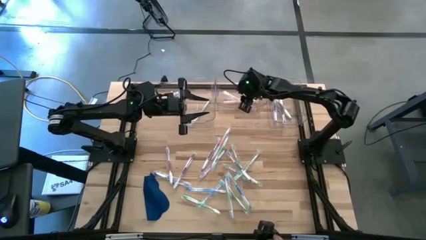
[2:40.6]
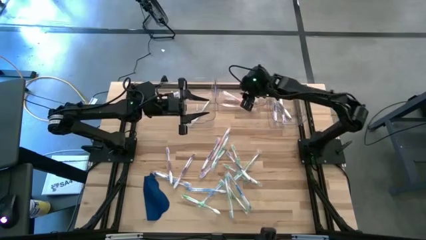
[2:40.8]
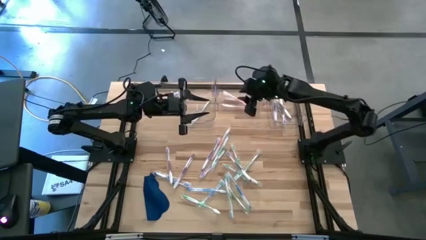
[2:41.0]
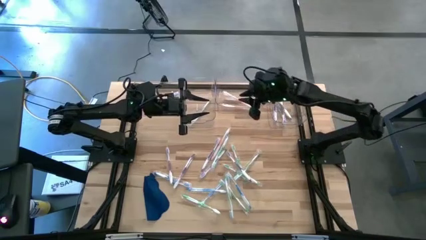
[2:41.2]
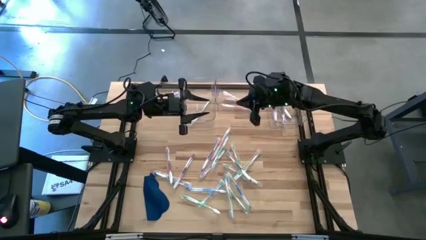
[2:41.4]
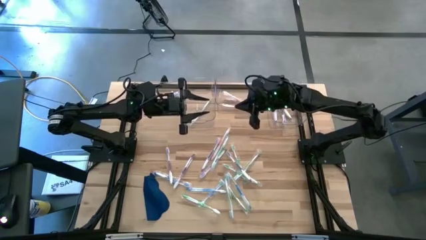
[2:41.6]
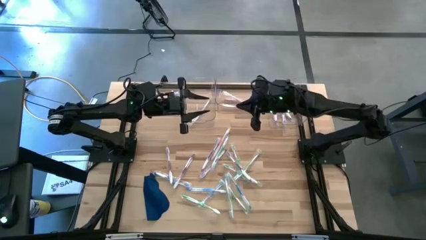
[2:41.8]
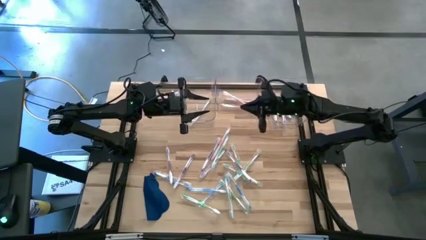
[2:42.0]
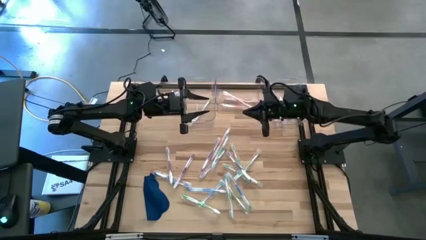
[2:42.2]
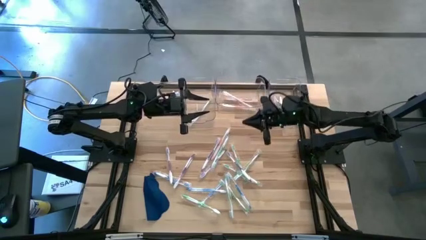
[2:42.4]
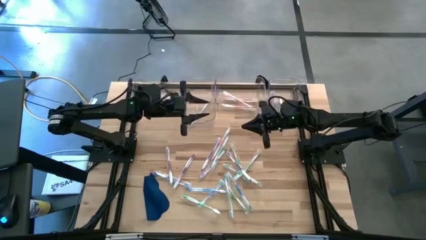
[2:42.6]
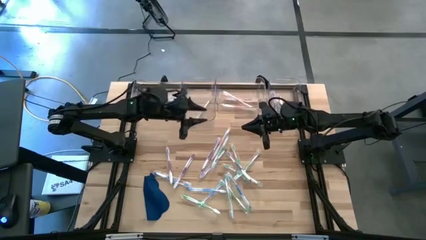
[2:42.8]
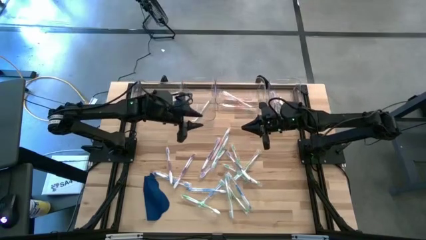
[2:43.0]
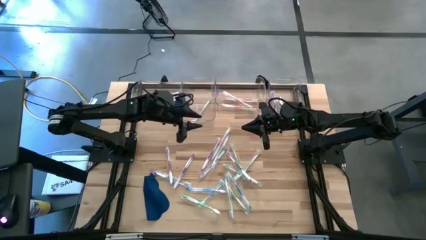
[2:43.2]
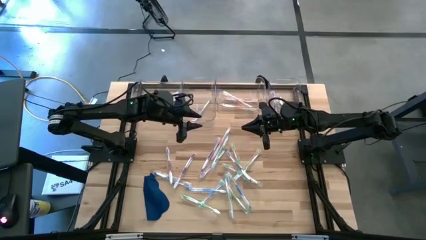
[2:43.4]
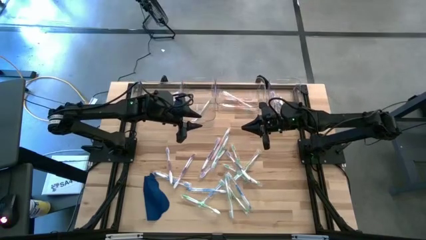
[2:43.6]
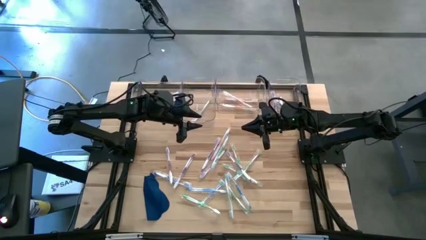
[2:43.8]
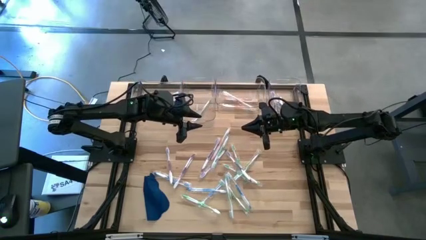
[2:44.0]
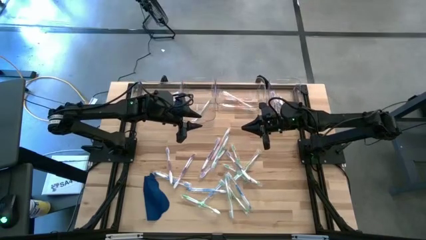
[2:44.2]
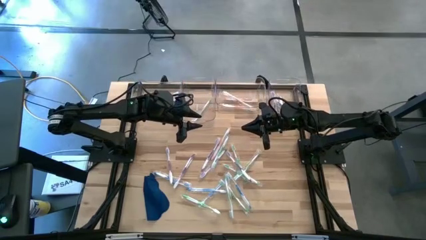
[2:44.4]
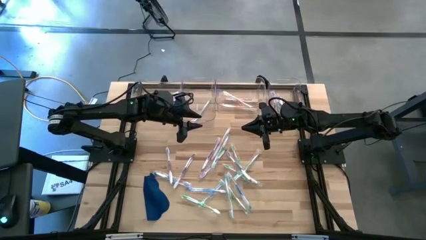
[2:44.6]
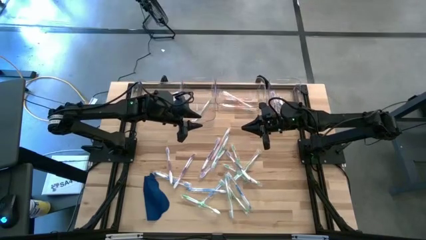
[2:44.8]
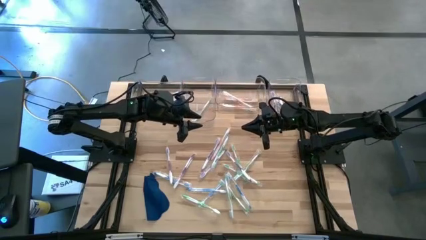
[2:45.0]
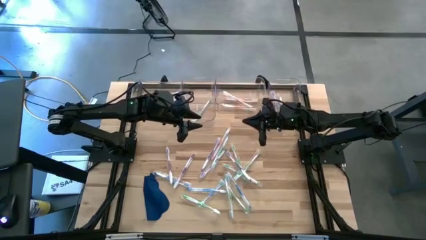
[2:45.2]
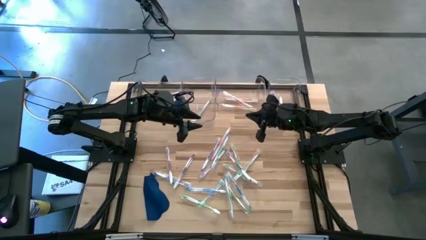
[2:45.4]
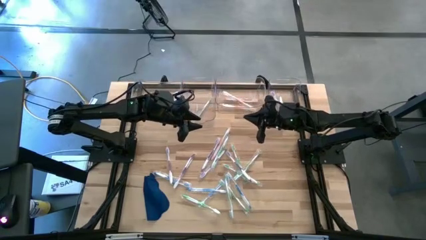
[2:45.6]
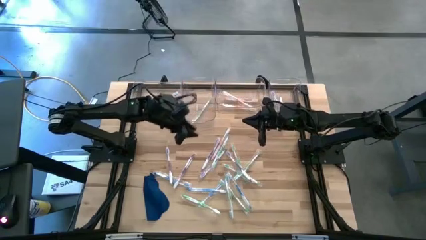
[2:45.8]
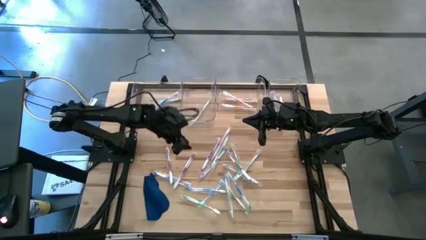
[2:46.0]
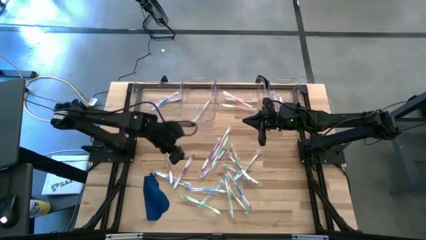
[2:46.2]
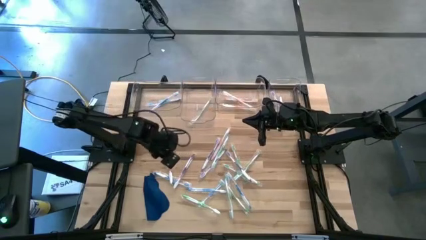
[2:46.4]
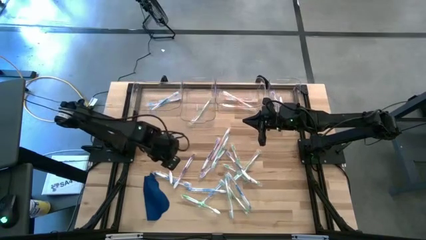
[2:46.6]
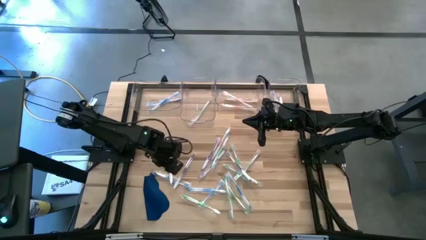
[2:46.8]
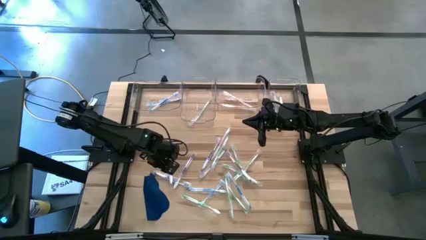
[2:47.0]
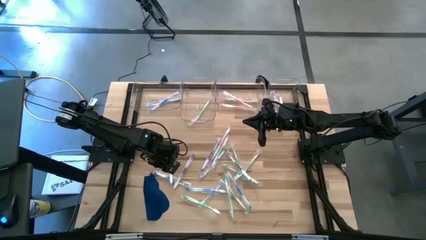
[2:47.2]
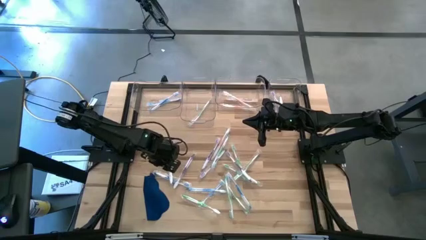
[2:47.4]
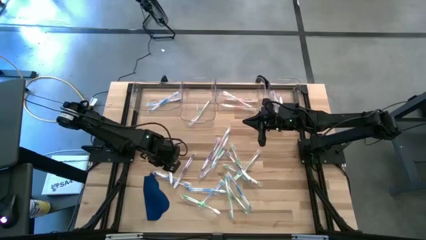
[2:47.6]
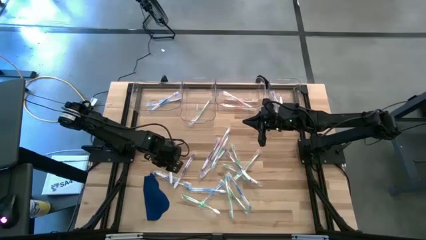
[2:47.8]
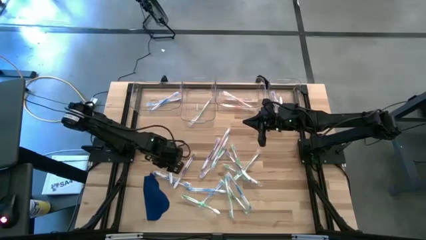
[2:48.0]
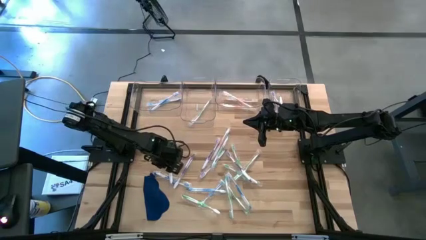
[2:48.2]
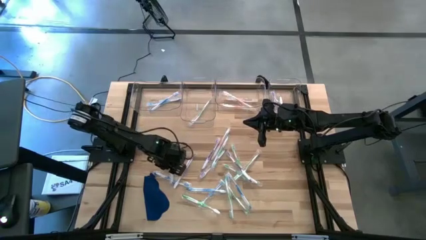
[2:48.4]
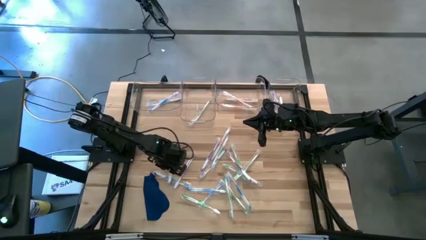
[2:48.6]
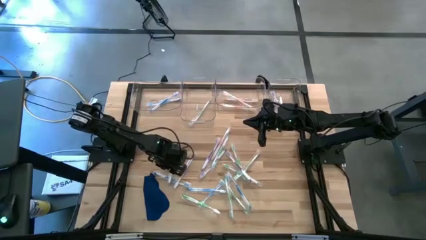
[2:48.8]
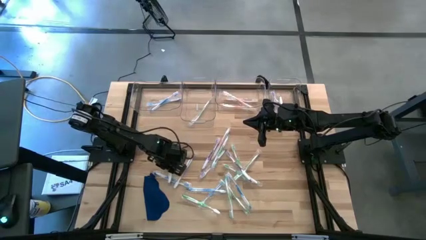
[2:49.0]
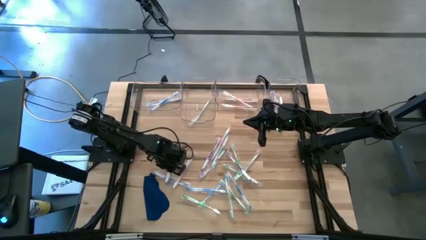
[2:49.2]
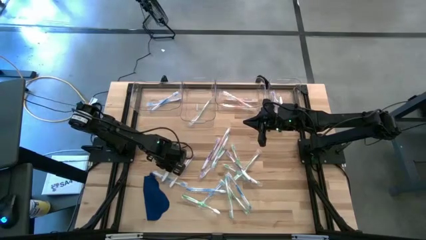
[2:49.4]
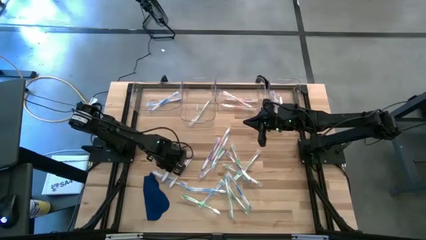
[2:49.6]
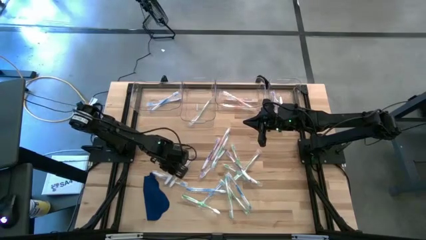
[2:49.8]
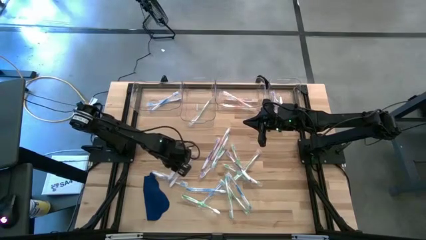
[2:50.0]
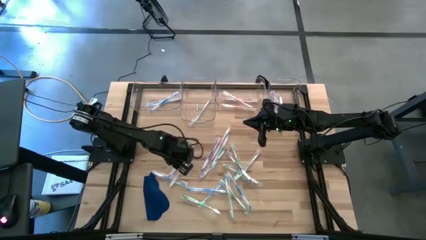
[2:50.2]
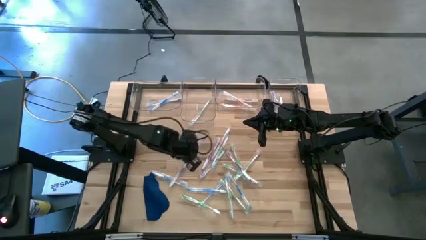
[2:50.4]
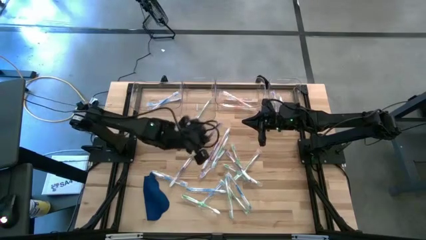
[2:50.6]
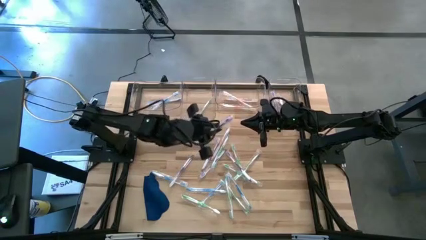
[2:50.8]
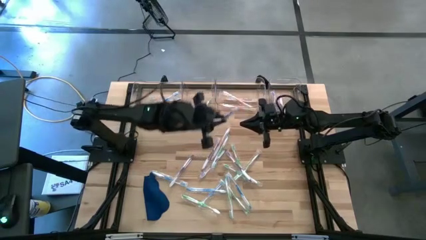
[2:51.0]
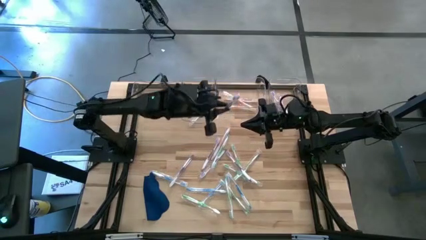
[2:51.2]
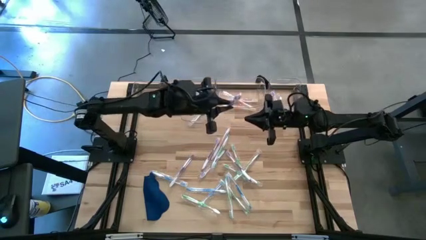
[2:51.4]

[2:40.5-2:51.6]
Task: Pick & Place Toothbrushes
Put the purple toothbrush into the right transparent bin

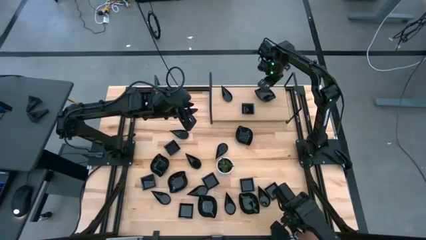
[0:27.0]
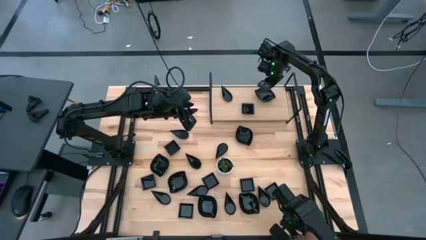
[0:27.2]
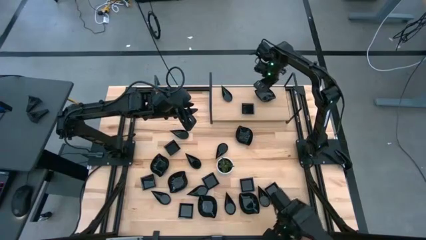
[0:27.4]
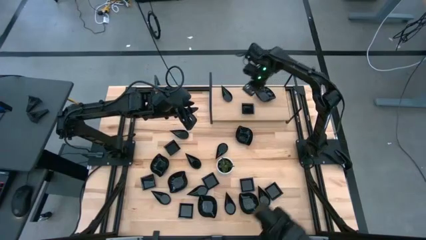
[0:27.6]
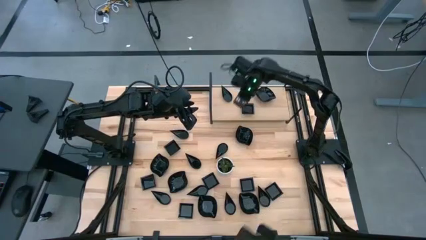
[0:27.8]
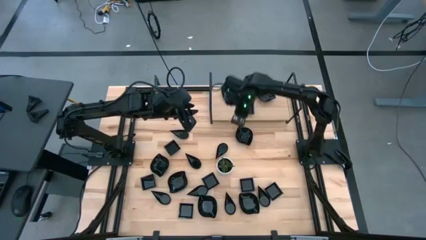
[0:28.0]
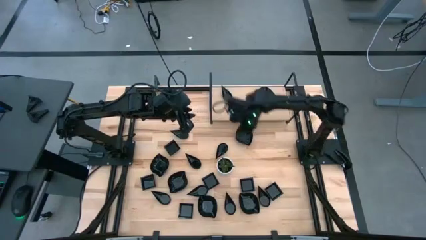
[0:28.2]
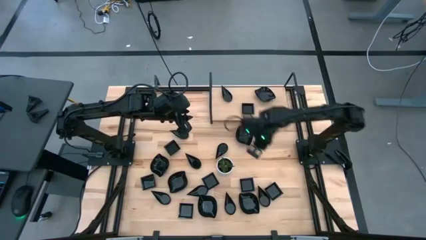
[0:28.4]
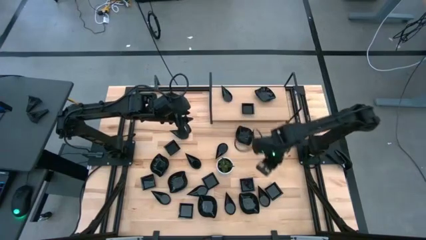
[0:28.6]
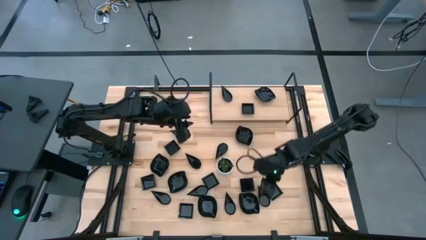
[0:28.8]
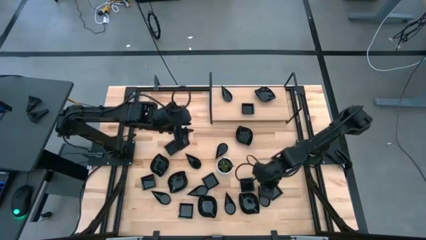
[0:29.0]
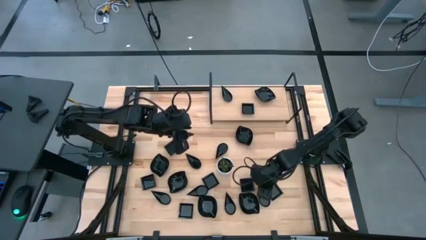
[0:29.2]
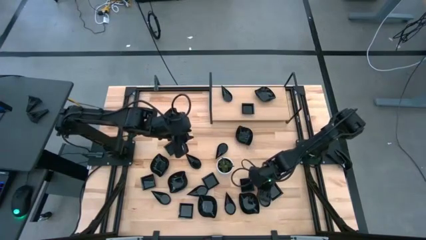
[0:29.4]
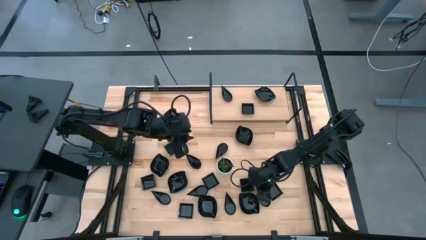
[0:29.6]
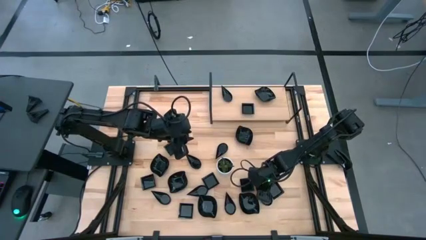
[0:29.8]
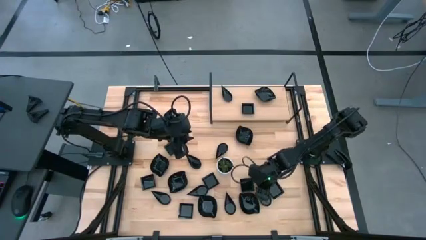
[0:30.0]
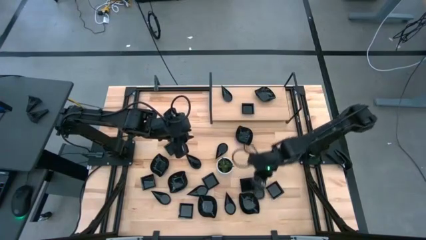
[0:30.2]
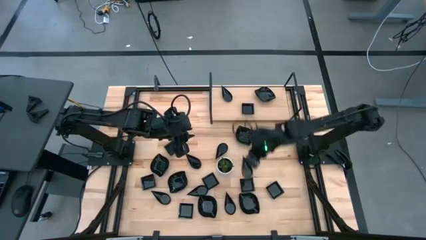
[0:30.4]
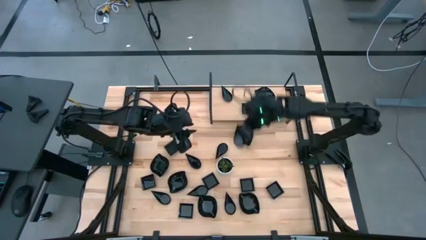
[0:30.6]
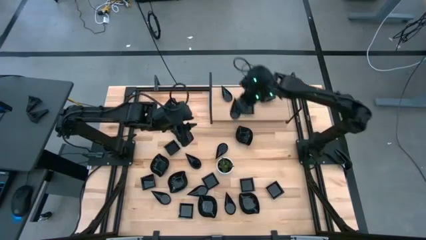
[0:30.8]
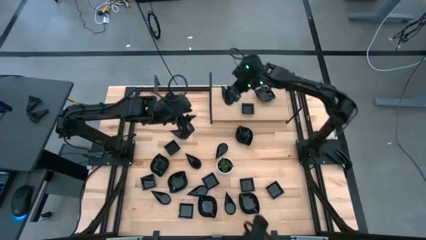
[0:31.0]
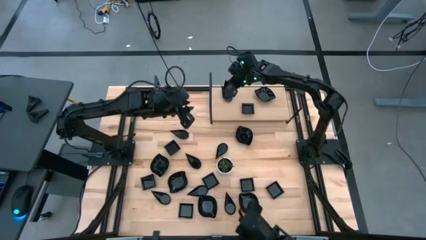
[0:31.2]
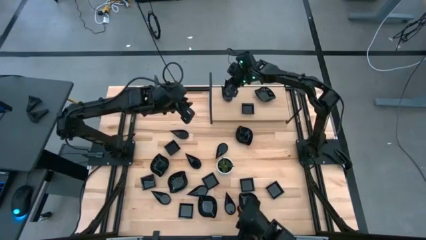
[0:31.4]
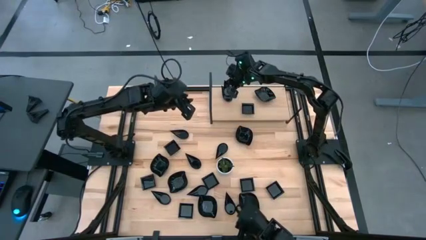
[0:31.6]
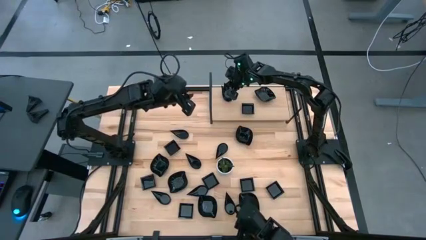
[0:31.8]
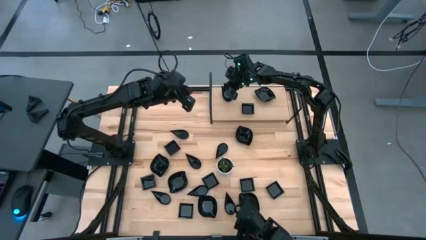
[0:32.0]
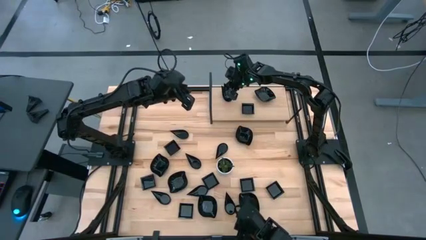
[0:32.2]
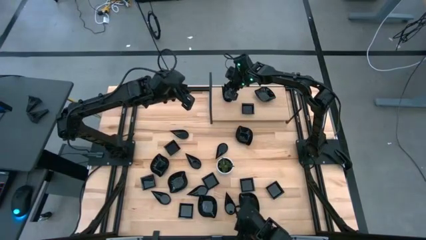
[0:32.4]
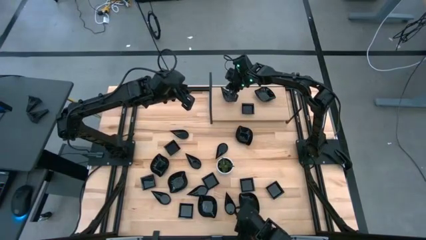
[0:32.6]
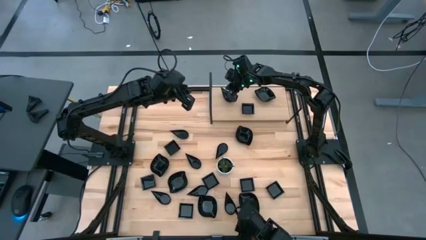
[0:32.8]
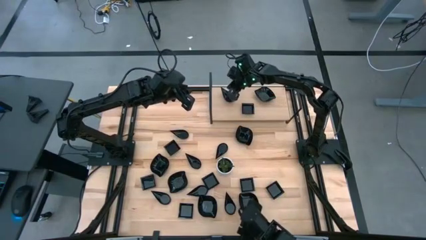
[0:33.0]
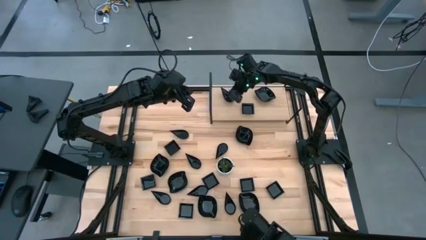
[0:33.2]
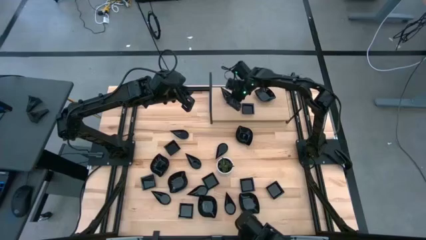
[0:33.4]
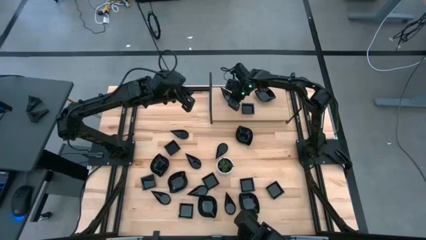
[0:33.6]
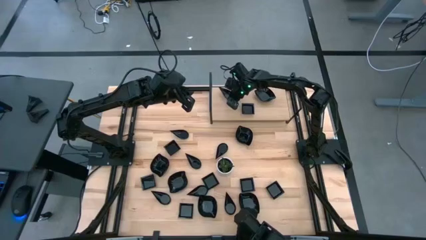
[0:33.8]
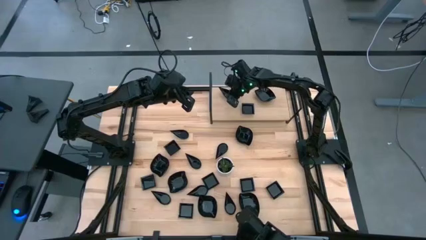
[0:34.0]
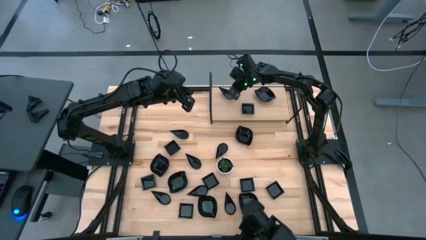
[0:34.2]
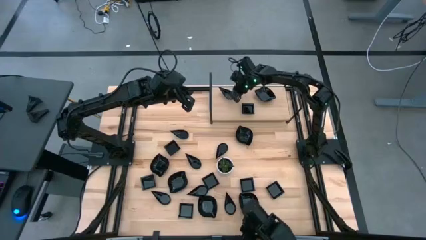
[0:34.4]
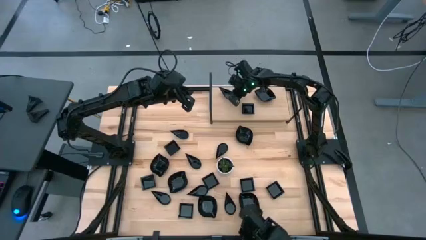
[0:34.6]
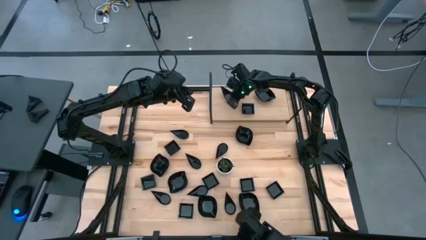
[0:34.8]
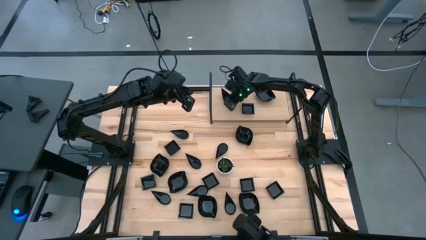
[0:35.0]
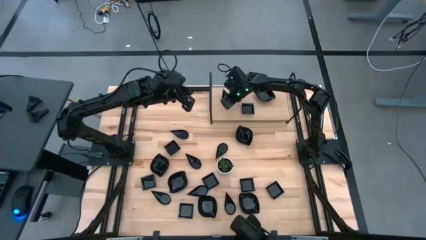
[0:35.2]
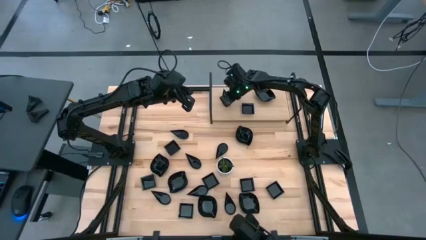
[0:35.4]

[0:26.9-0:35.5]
Task: Pick & Place Mini shaped plates
Stack the drop shaped plate on top of the drop shaped plate on the shelf
